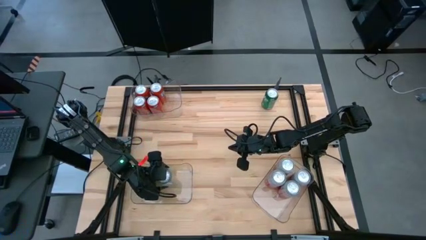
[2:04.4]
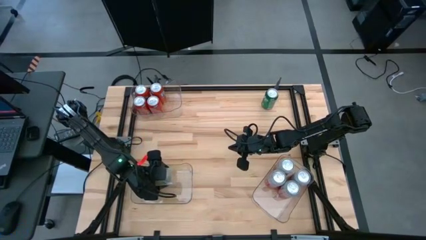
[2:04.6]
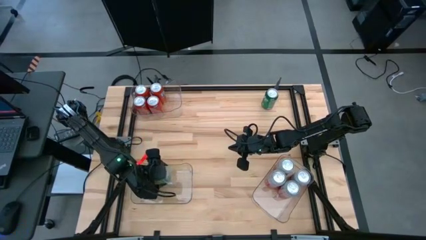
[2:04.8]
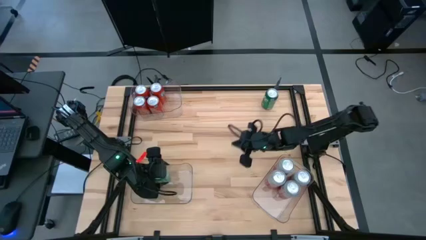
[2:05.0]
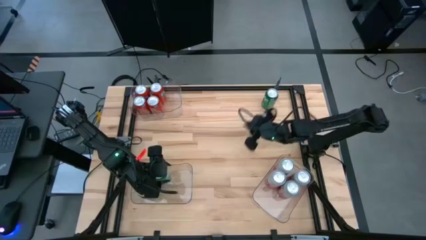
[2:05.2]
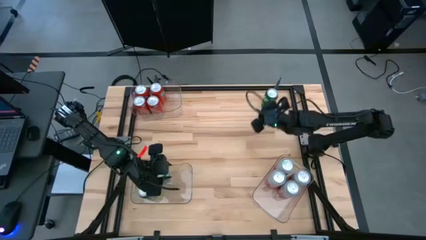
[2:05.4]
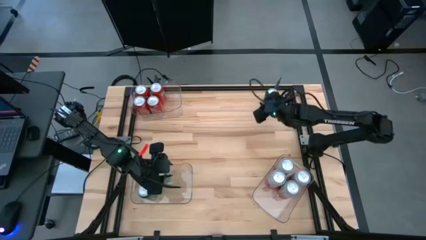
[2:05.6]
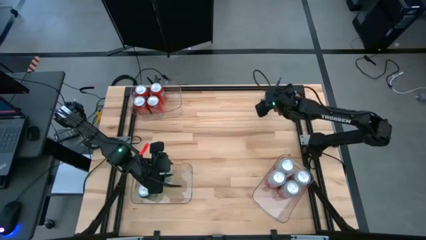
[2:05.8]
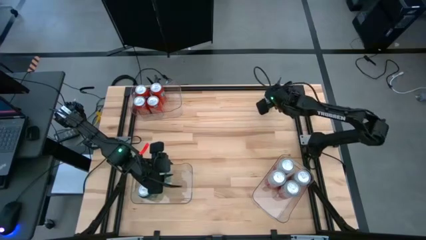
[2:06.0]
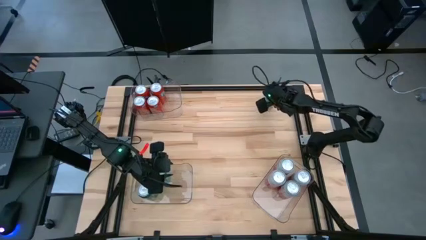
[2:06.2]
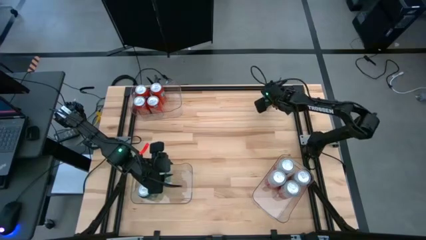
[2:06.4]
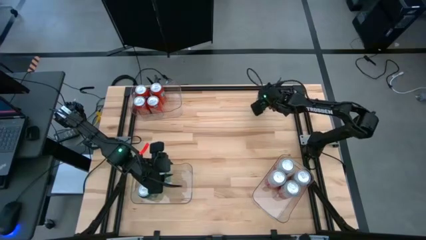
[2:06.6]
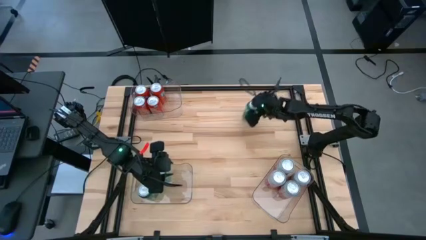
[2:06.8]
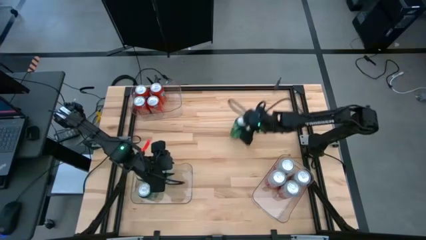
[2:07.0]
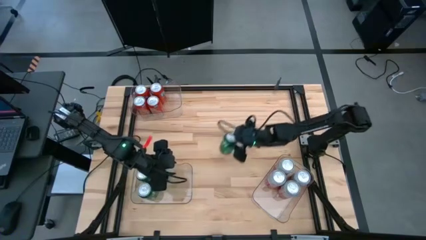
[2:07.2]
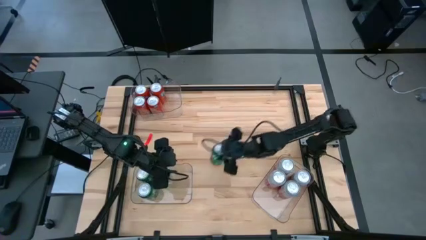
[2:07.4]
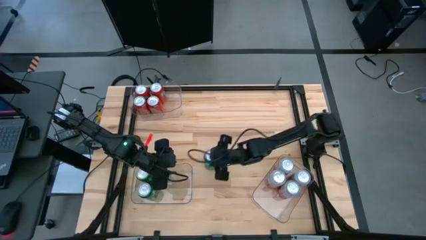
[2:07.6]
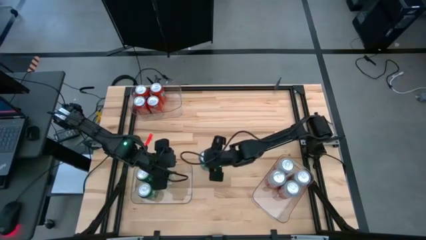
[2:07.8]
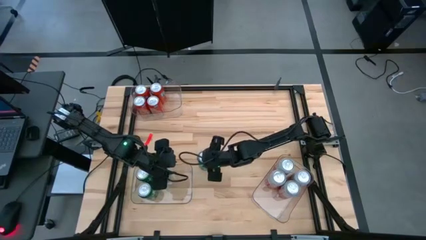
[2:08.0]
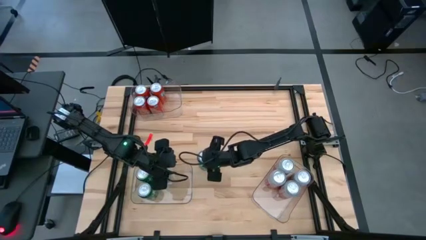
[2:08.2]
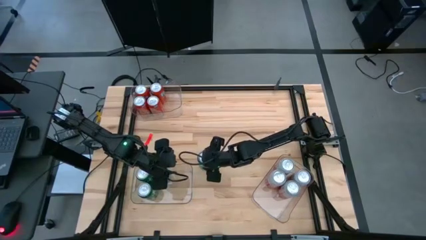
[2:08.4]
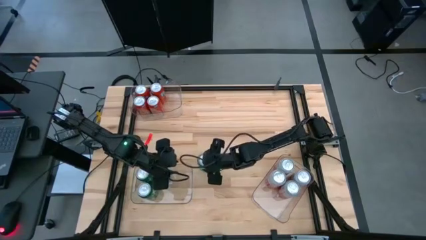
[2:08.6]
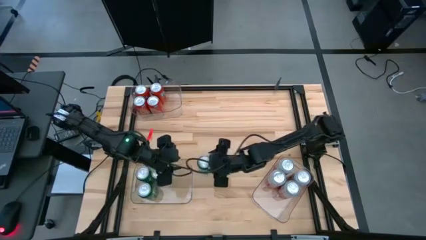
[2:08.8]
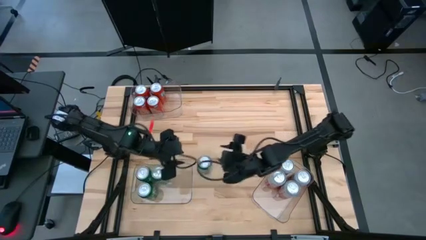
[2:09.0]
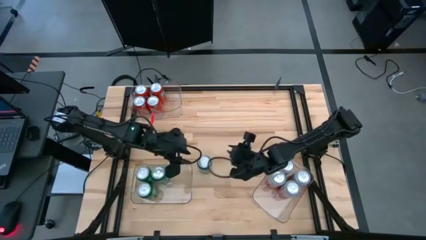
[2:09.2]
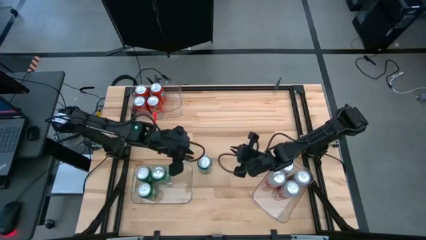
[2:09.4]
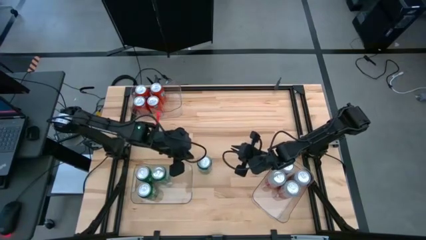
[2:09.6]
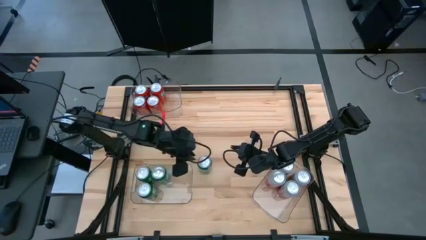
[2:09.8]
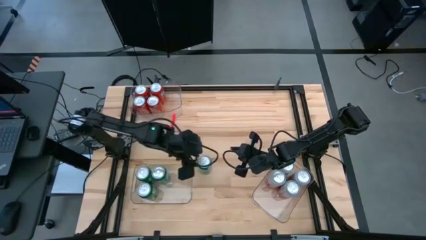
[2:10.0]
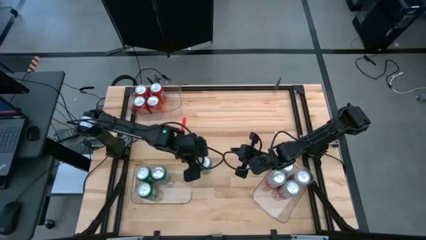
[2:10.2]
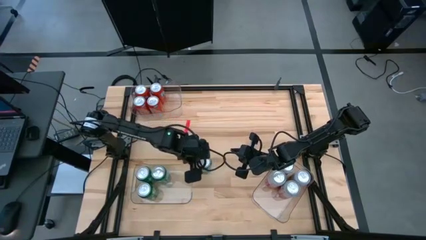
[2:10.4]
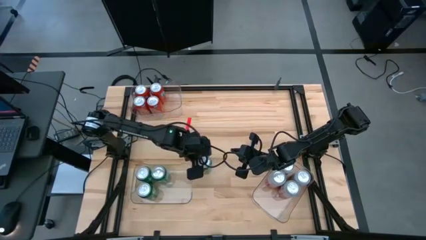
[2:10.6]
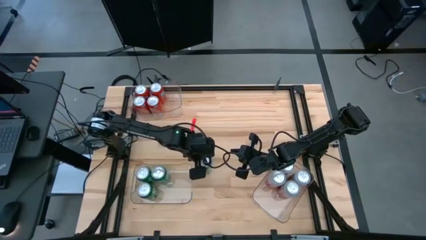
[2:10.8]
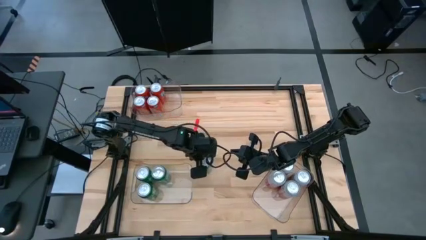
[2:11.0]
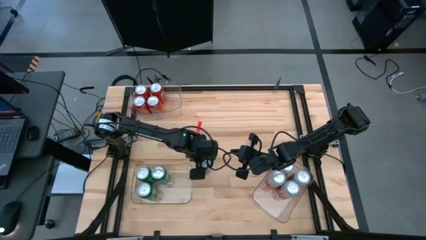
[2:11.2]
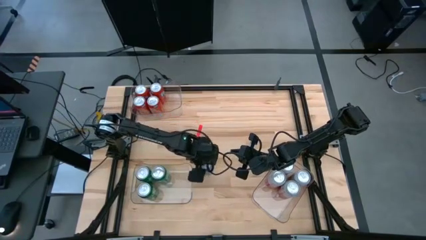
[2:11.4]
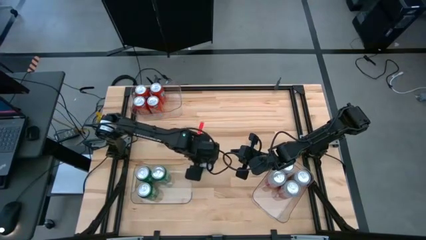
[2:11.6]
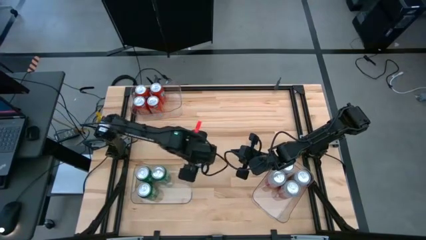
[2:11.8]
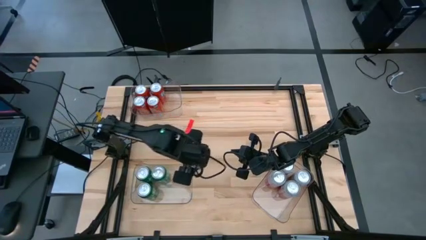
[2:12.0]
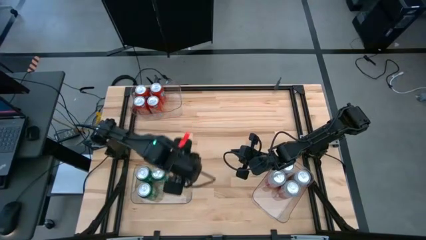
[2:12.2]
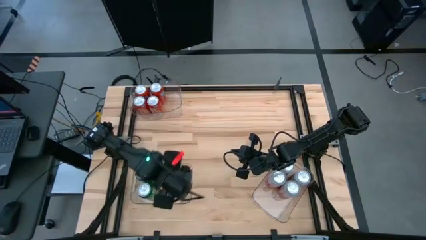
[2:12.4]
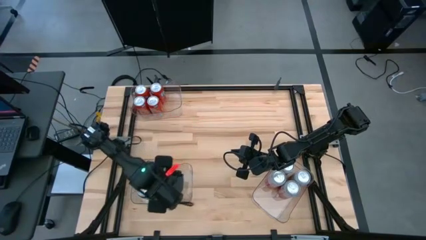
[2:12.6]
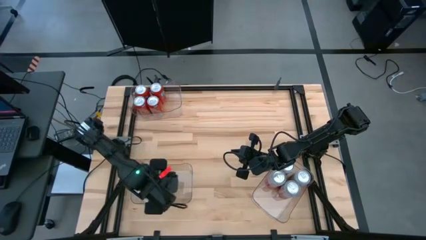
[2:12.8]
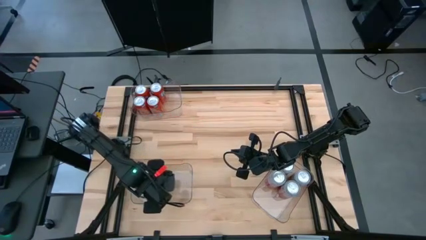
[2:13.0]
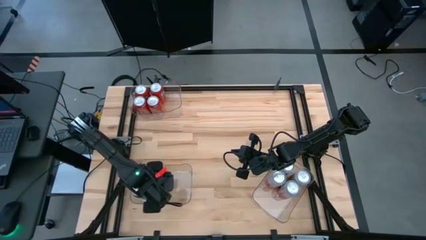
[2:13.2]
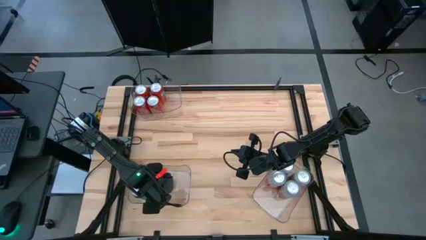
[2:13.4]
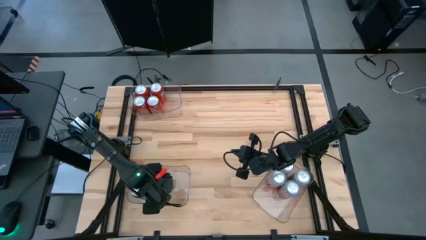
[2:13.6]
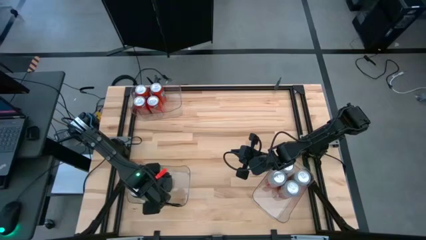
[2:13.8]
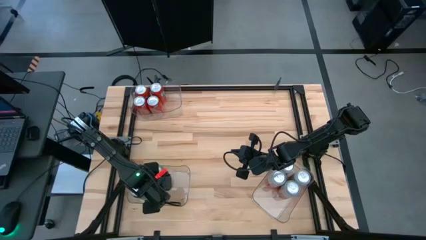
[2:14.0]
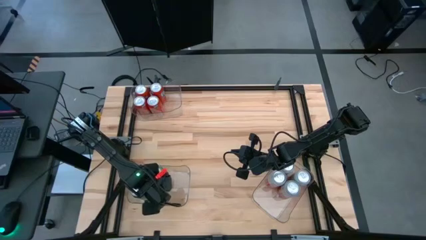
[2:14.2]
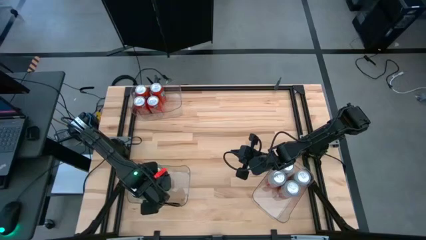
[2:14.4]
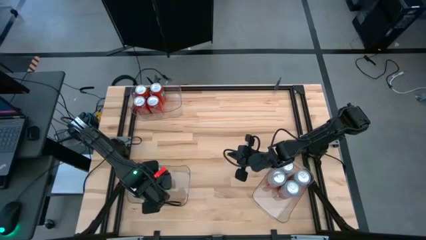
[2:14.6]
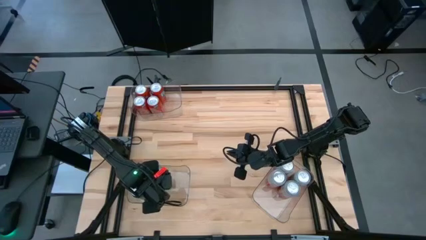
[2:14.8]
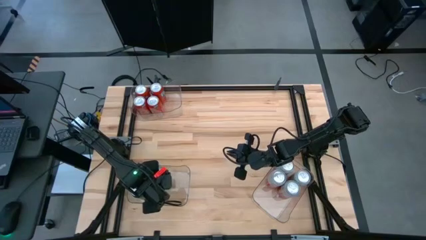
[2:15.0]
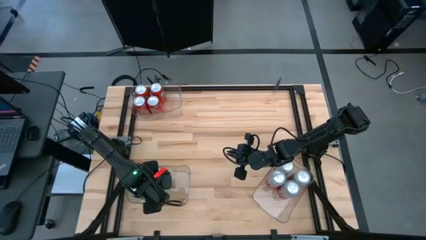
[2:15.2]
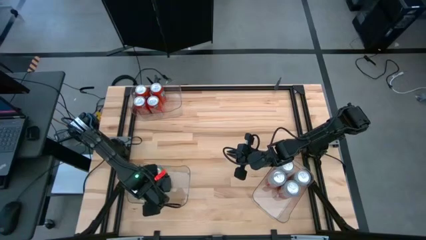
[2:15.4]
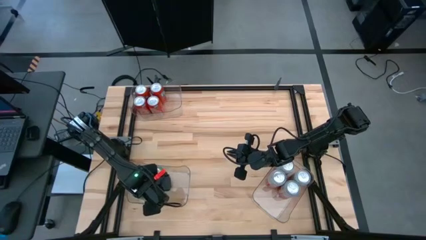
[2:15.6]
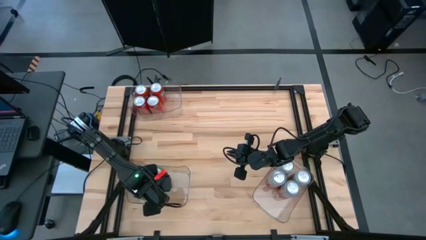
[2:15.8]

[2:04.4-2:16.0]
Task: Sort soda cans
Put the green soda can into the bottom right transparent bin
